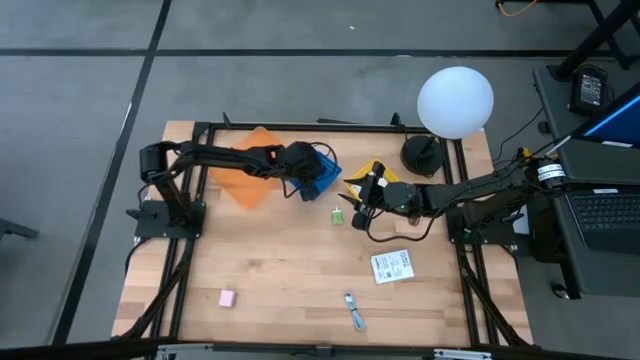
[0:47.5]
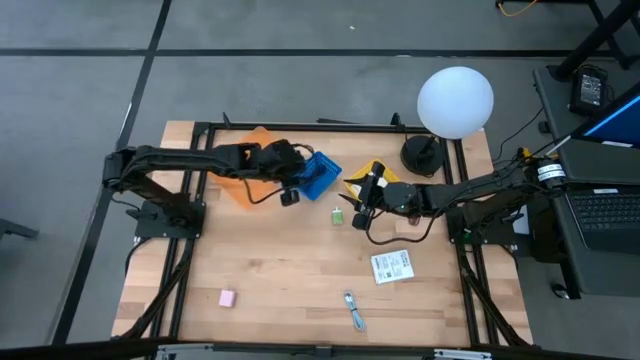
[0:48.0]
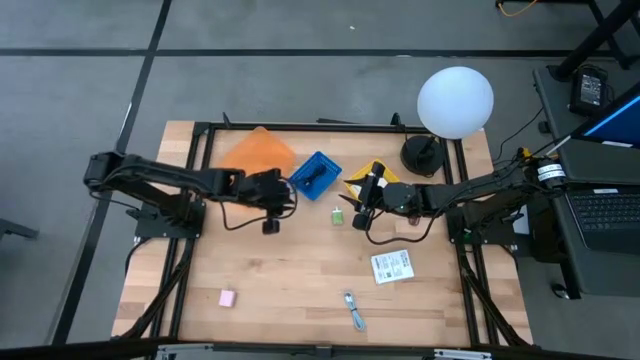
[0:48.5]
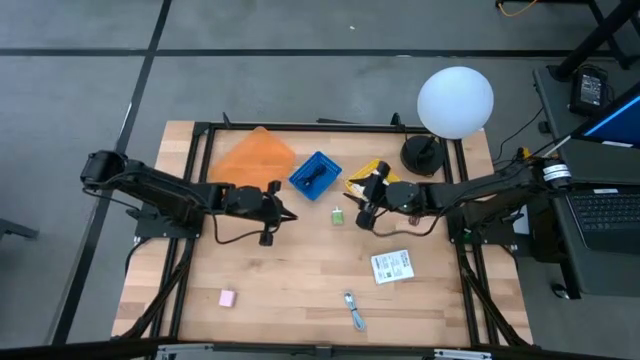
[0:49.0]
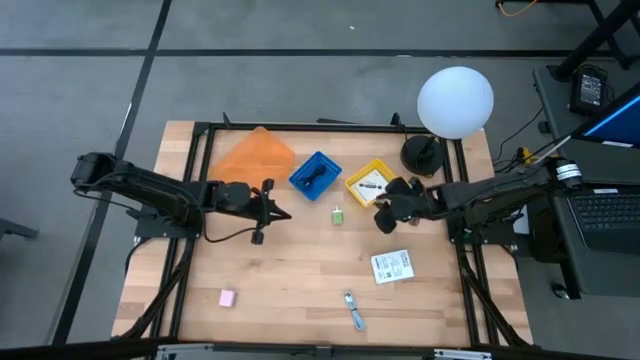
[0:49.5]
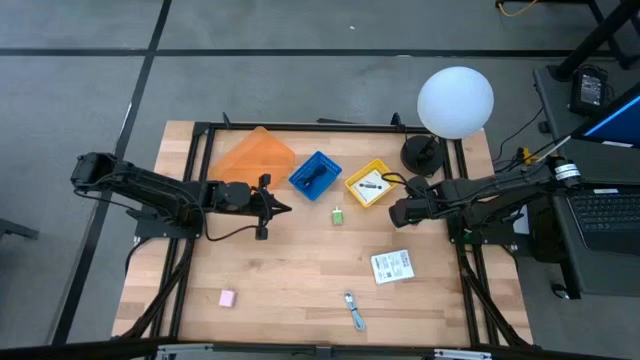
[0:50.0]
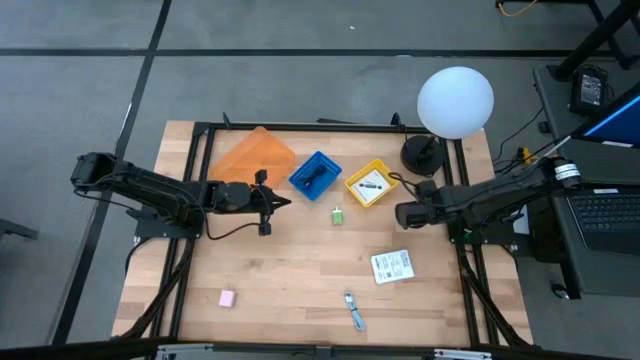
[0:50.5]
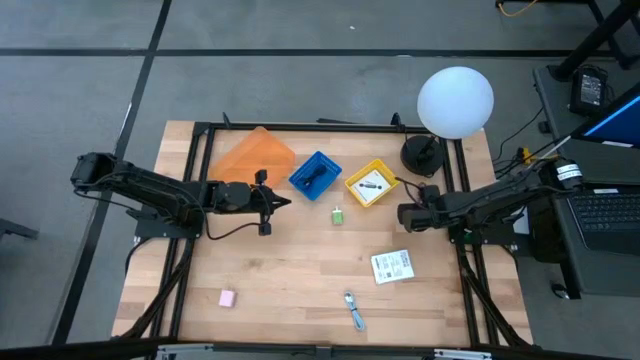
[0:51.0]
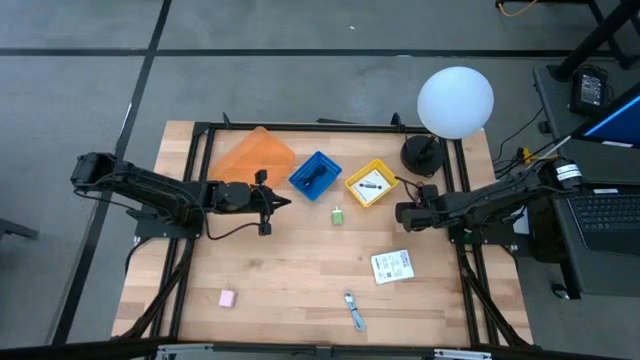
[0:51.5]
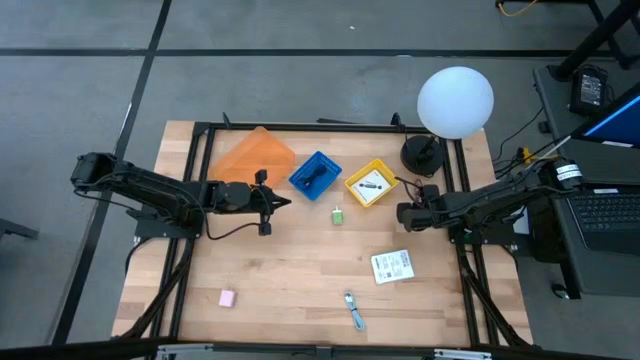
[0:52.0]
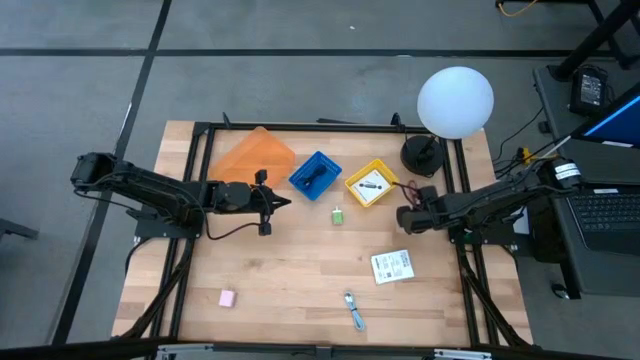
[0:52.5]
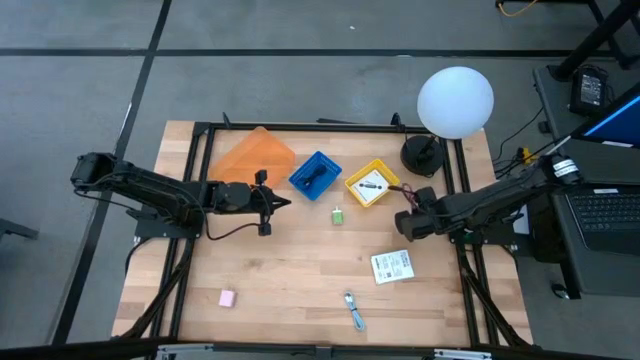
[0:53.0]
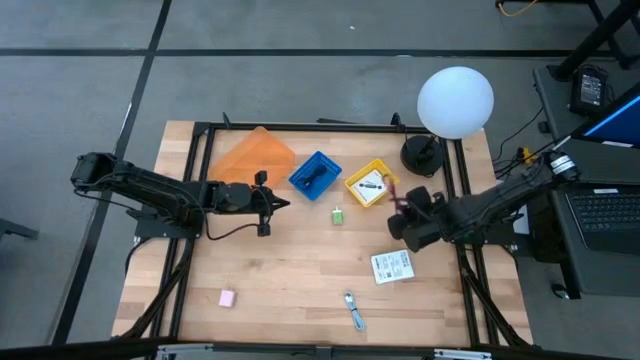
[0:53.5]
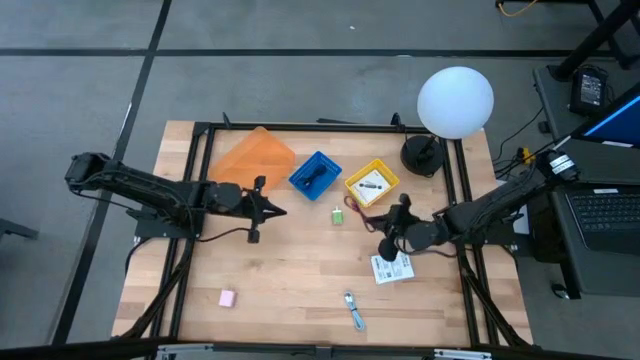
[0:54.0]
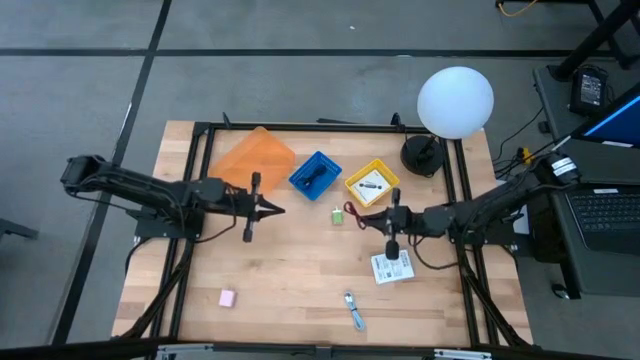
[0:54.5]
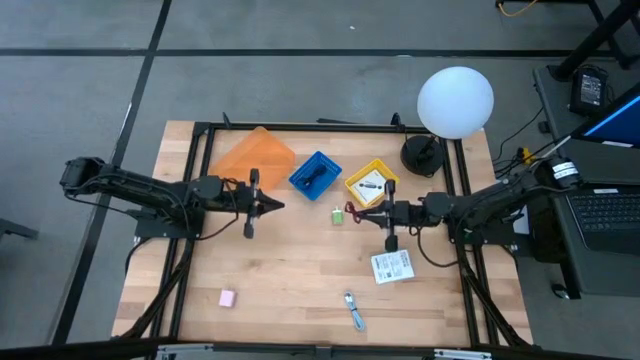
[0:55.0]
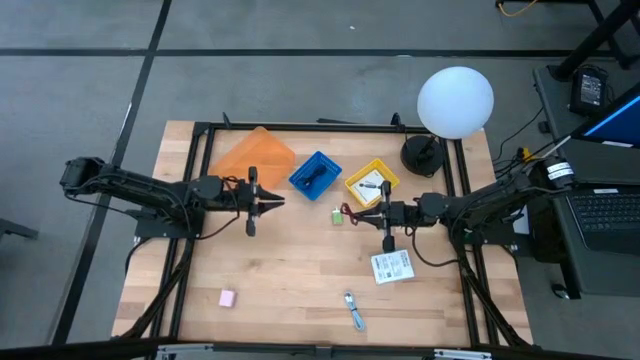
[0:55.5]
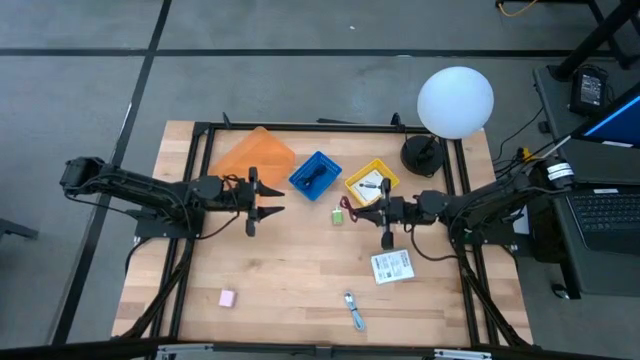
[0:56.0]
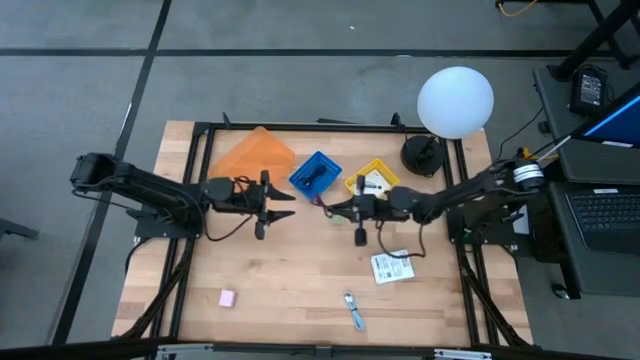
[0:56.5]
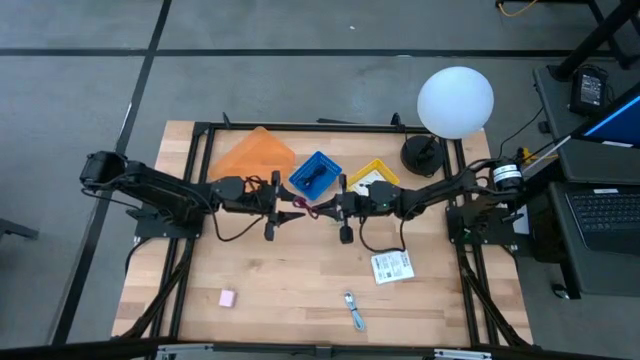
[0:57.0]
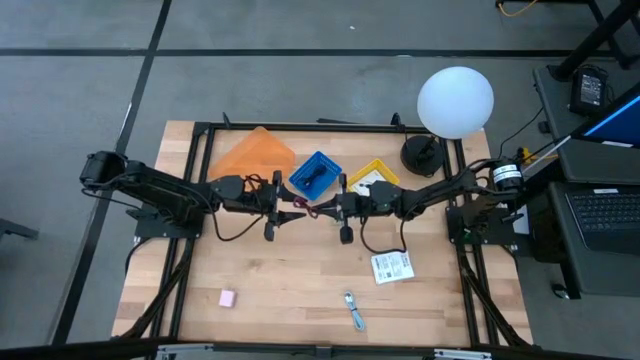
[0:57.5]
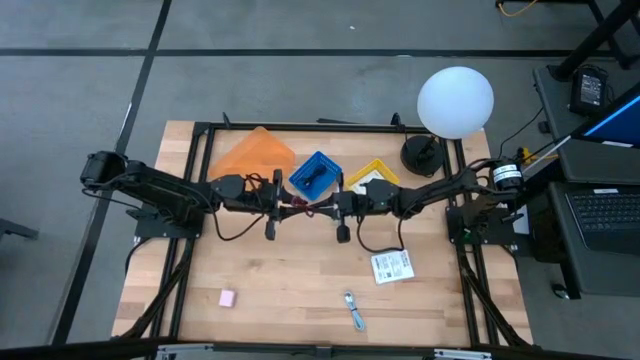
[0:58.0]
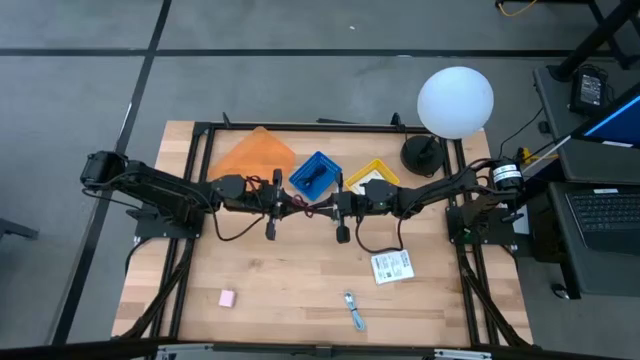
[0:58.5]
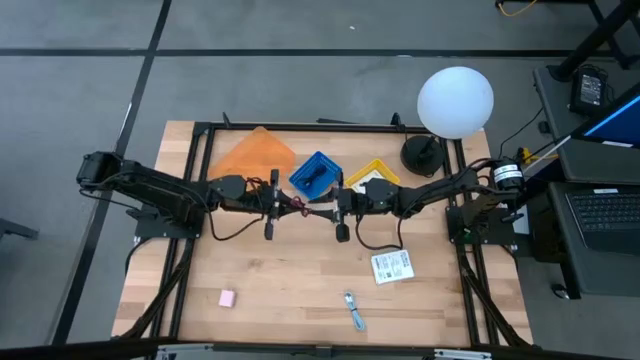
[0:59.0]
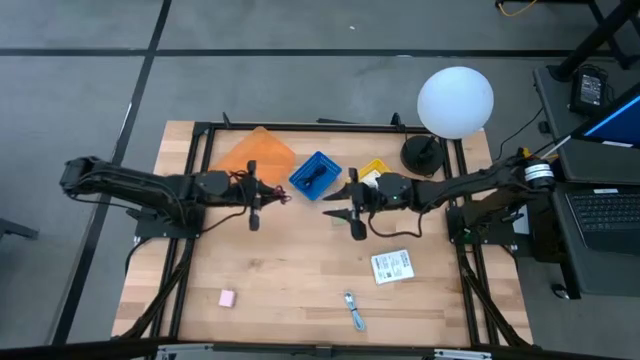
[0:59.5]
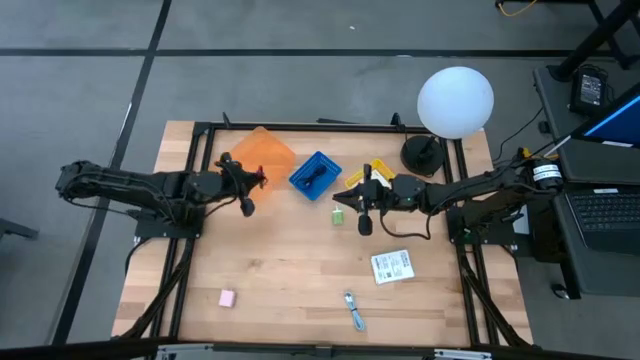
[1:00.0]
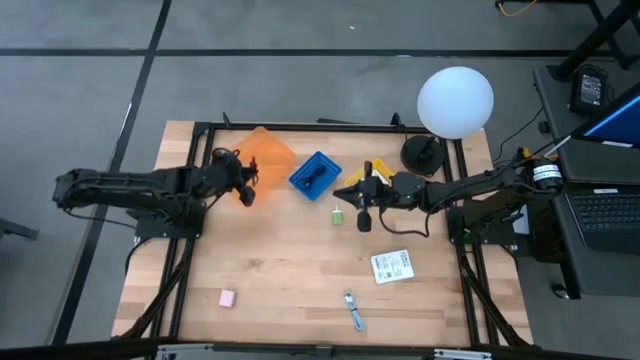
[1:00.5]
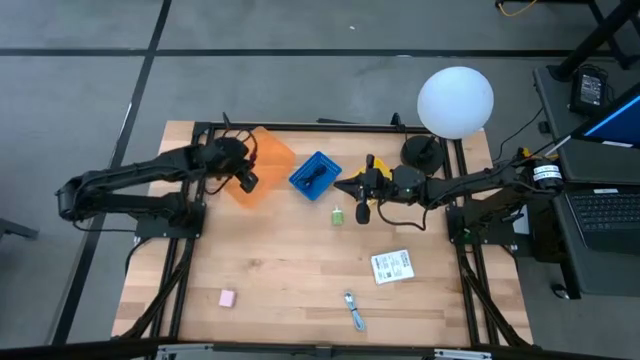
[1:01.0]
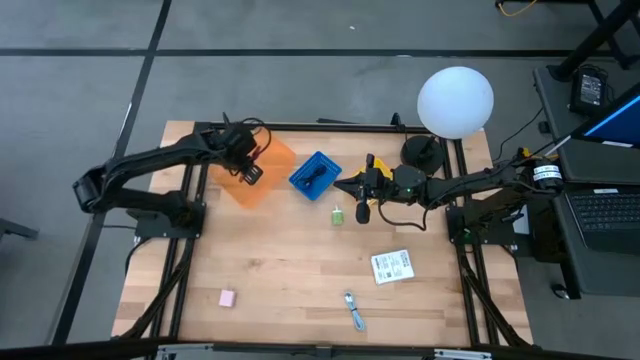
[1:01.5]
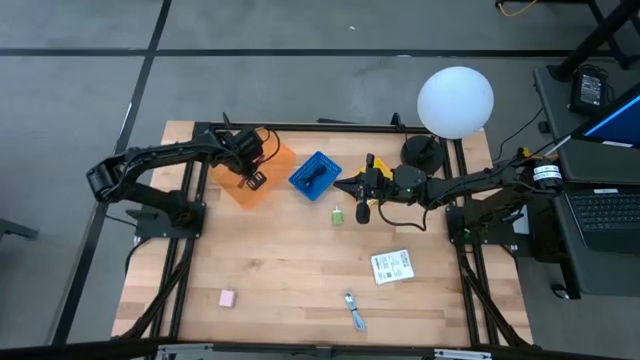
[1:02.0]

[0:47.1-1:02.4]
Task: Pick and place items into bin
Put the pink charger cable into the orange bin

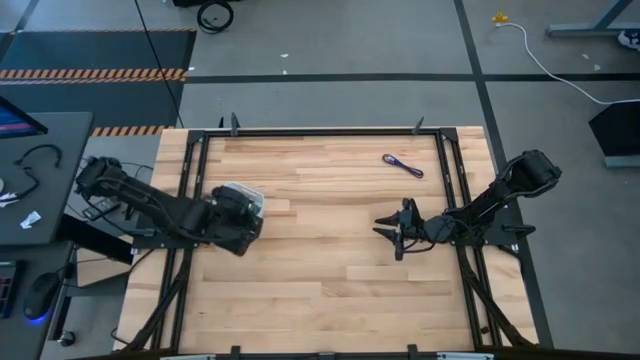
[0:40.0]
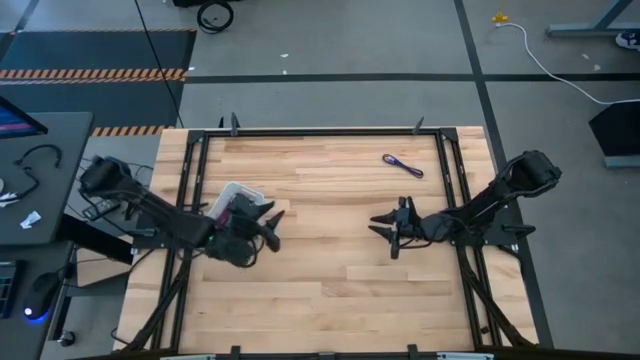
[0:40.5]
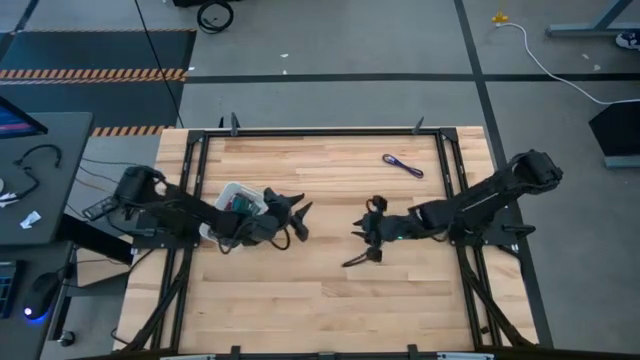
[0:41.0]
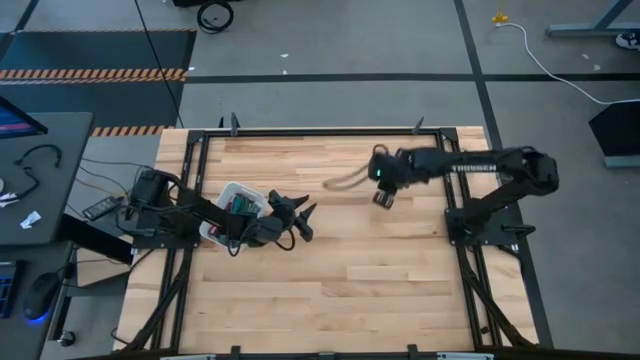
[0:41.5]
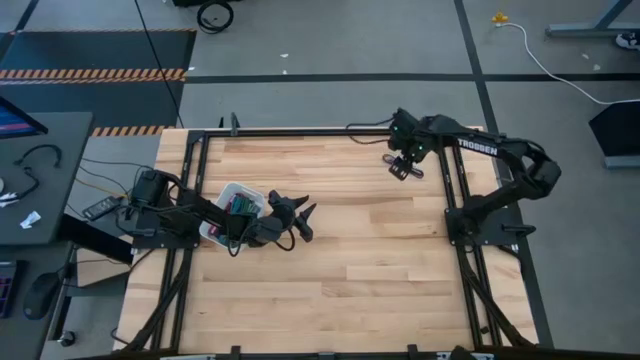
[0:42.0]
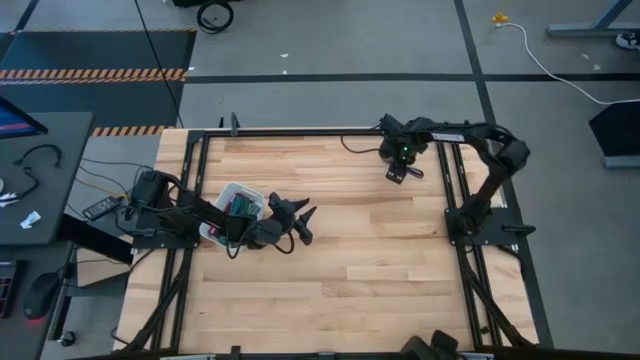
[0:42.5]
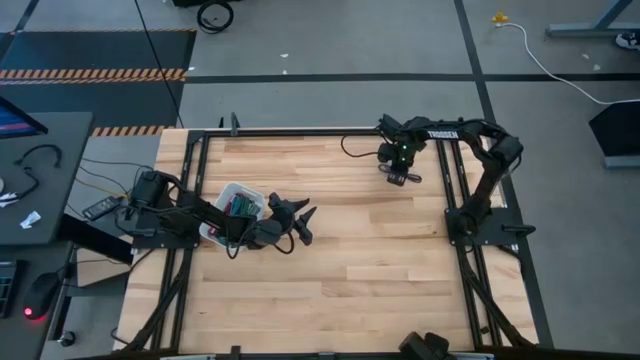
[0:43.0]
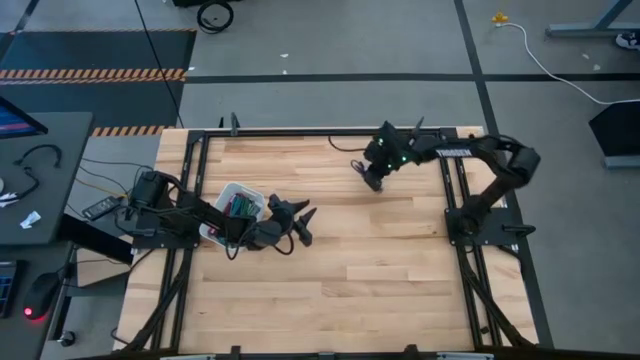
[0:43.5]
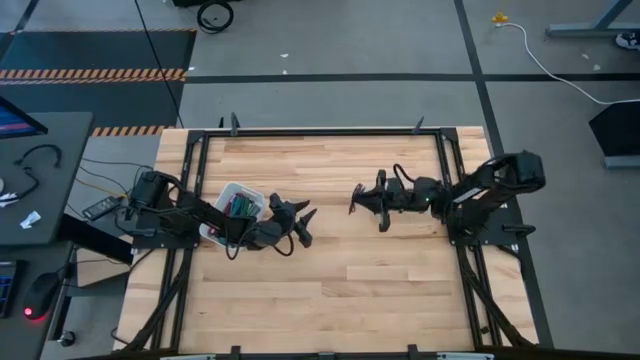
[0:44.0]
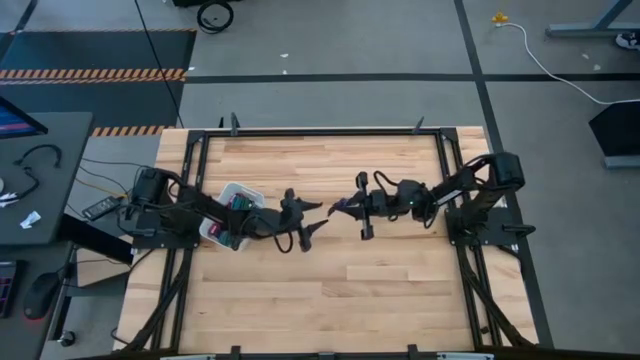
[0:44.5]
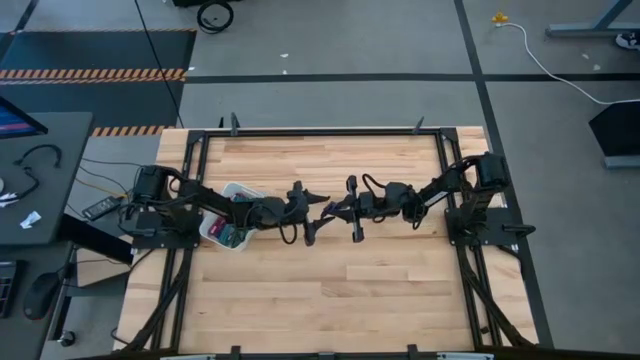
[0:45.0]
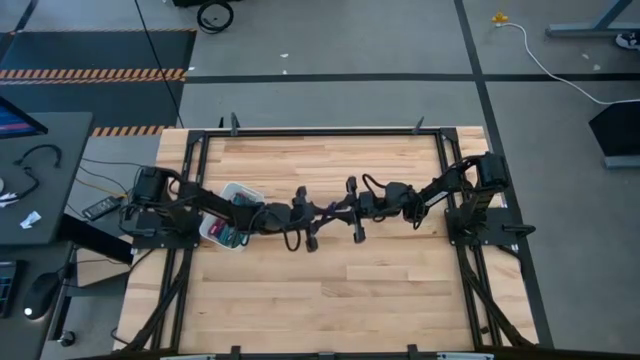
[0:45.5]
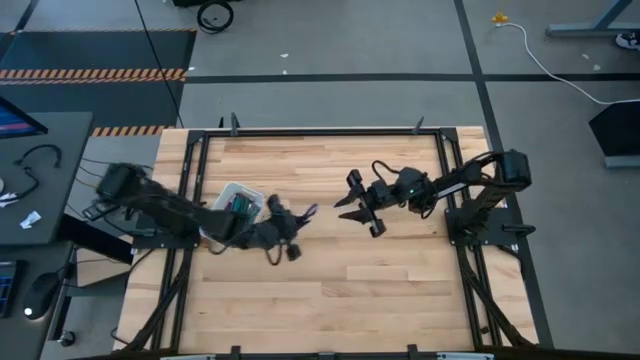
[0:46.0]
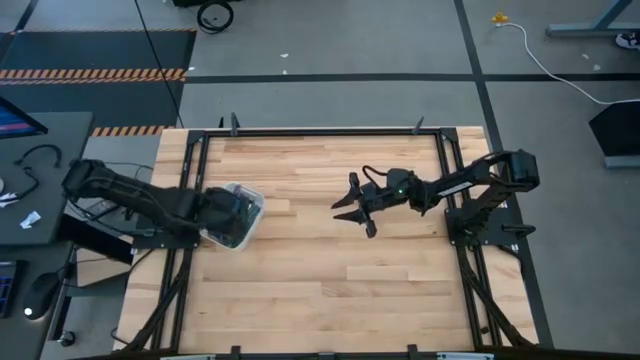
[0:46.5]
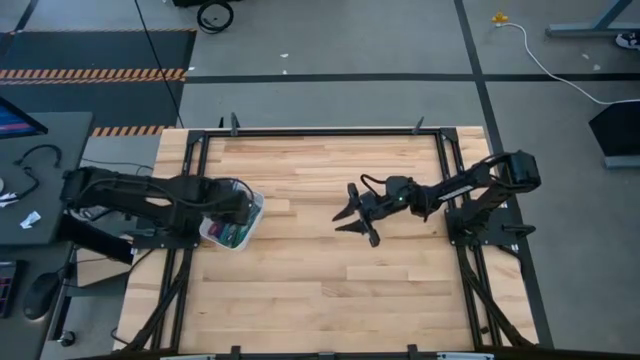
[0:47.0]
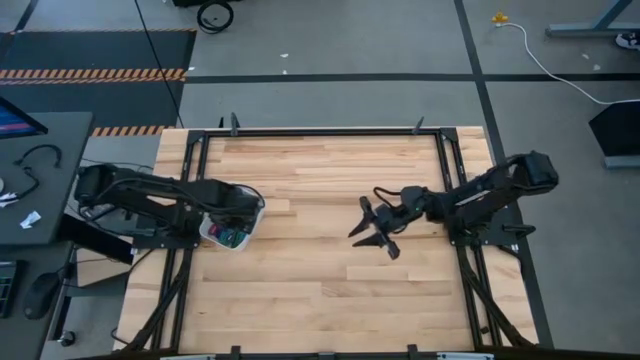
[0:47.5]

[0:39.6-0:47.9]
Task: Pick and place USB-C Cables
Put the violet charger cable into the white bin
